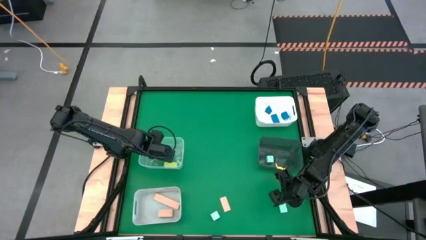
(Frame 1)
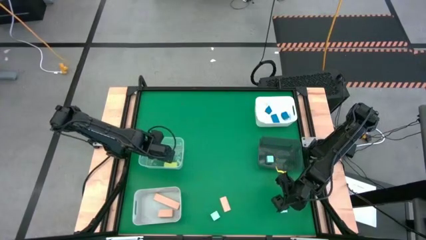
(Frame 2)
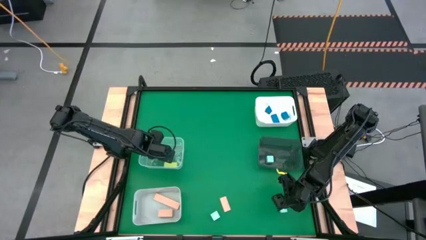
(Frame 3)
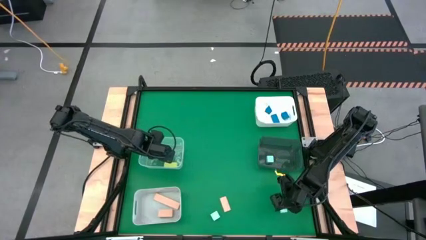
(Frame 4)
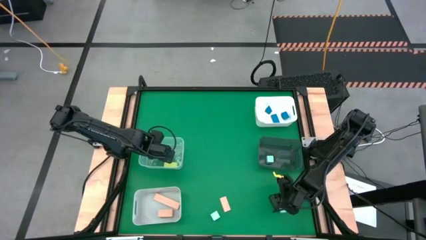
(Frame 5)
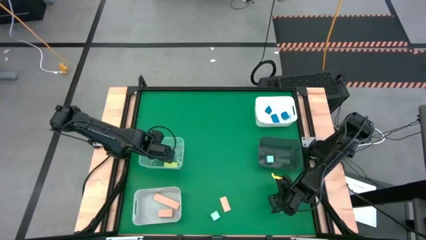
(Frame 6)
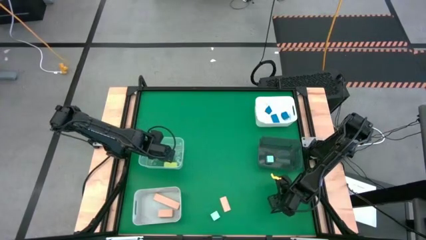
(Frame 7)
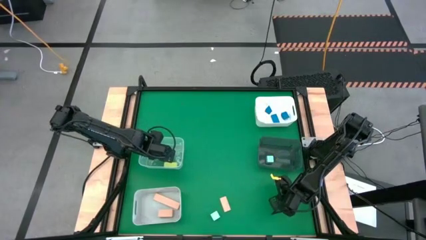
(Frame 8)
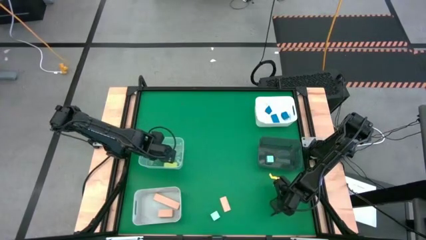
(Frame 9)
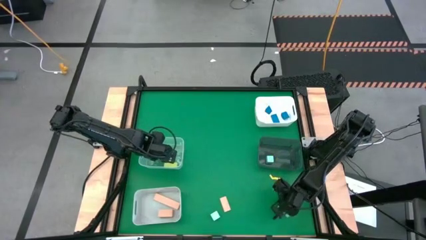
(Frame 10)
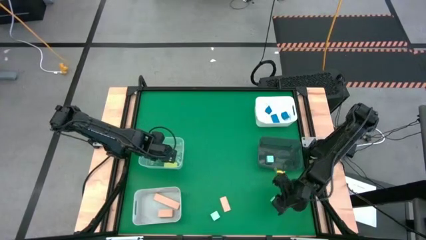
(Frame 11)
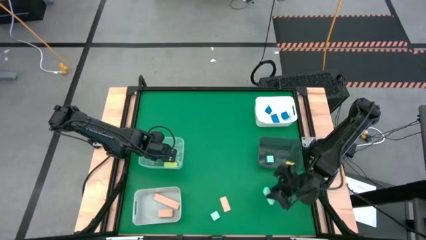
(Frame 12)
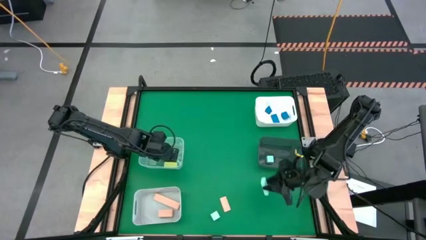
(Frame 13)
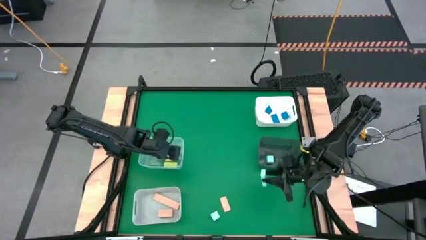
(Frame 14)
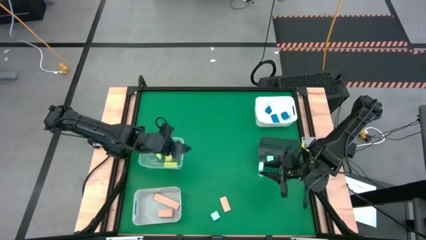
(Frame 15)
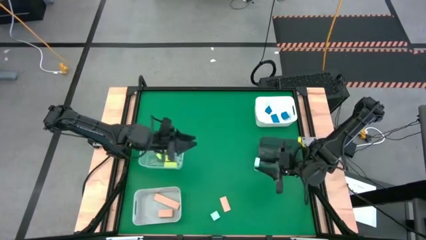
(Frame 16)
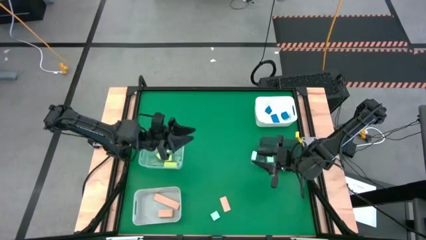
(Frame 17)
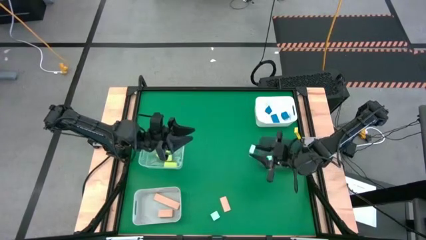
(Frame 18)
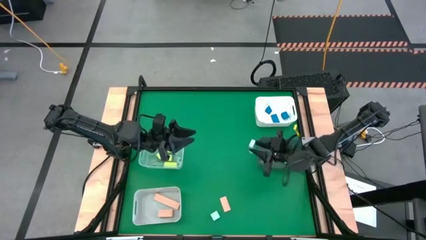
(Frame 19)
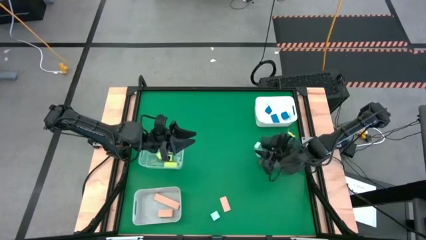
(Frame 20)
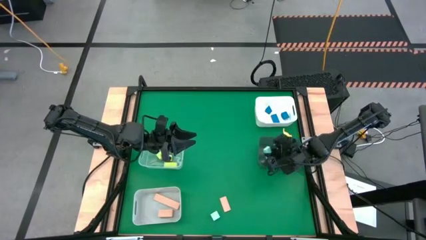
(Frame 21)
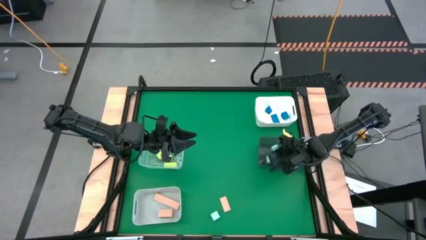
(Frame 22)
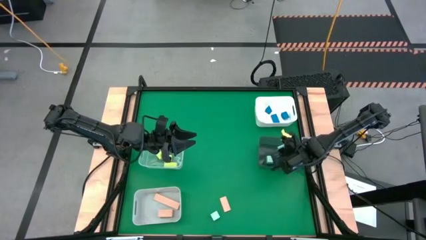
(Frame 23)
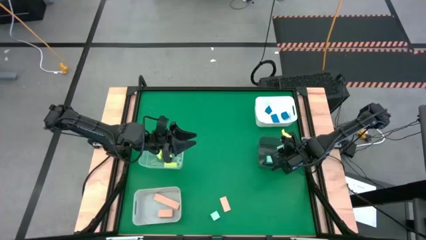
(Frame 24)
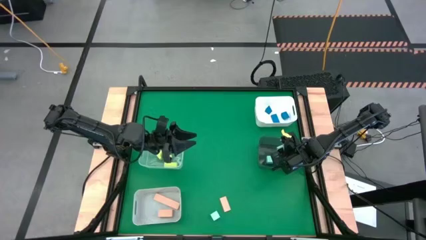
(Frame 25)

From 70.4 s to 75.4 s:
Task: Sort & place blocks by color
Put the light blue block into the black bin

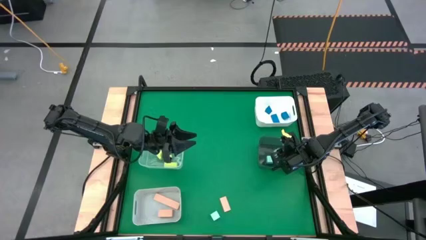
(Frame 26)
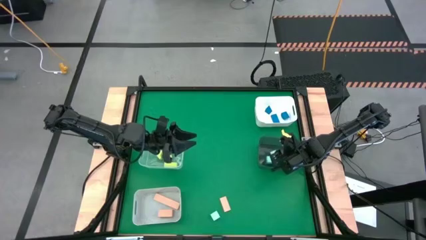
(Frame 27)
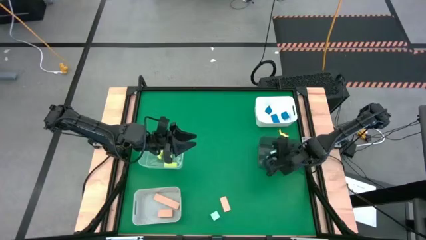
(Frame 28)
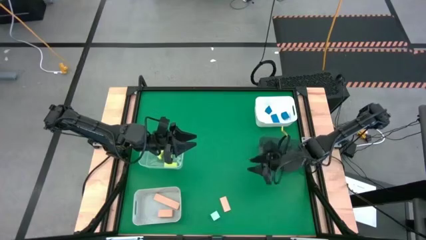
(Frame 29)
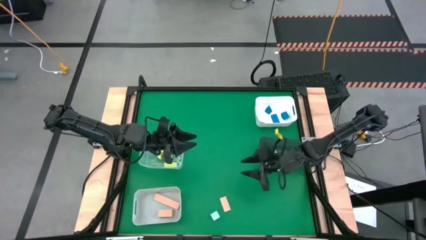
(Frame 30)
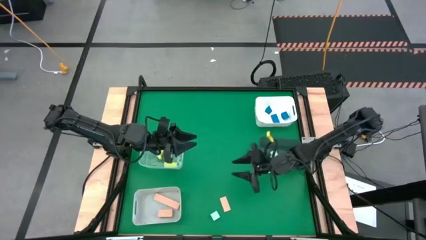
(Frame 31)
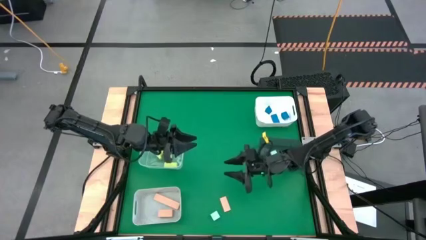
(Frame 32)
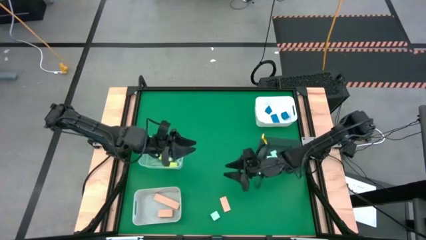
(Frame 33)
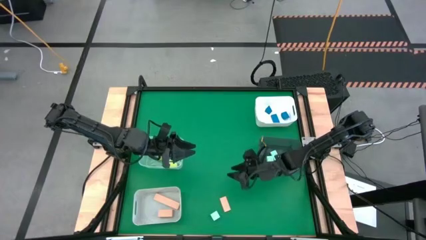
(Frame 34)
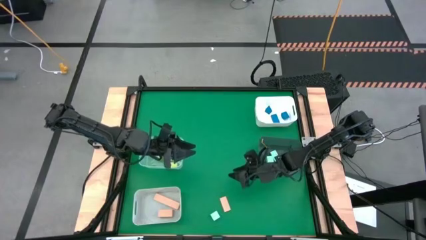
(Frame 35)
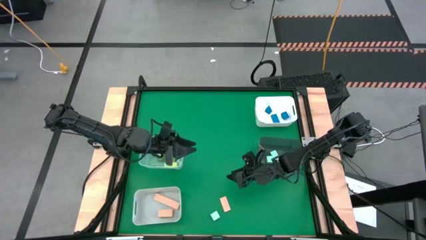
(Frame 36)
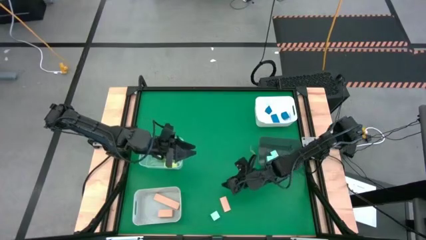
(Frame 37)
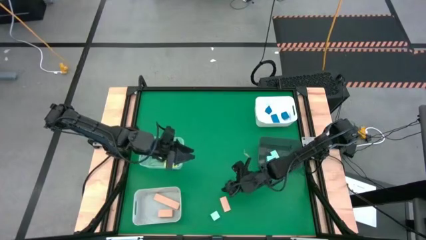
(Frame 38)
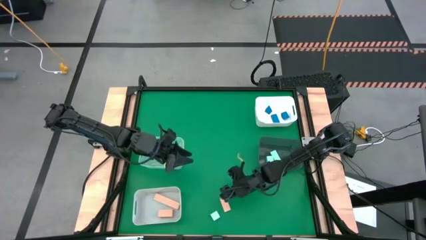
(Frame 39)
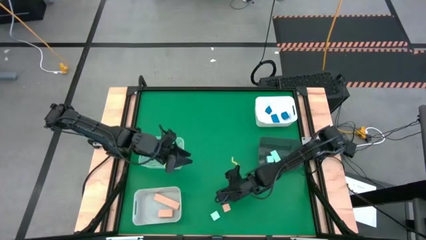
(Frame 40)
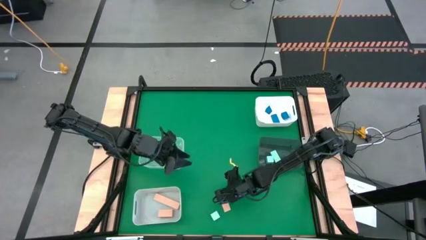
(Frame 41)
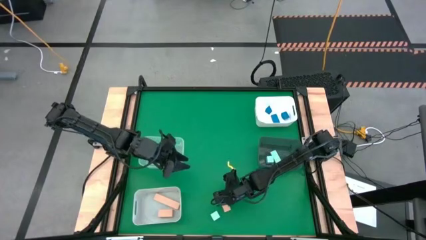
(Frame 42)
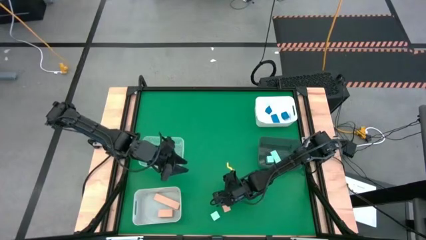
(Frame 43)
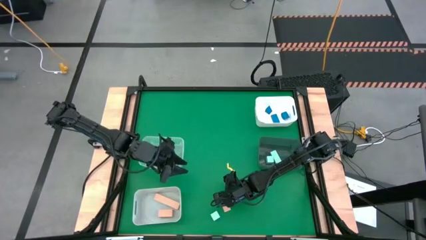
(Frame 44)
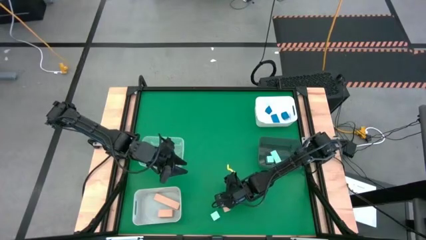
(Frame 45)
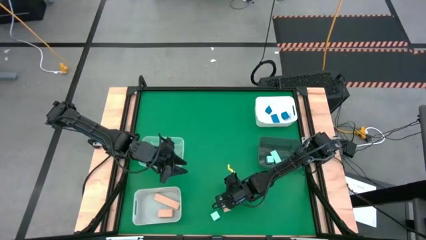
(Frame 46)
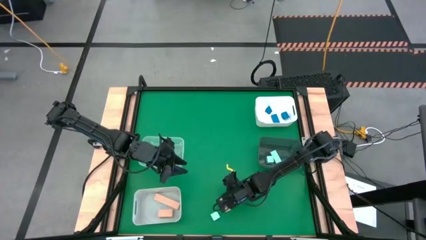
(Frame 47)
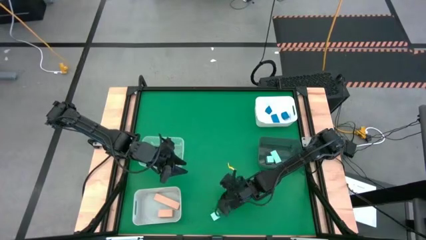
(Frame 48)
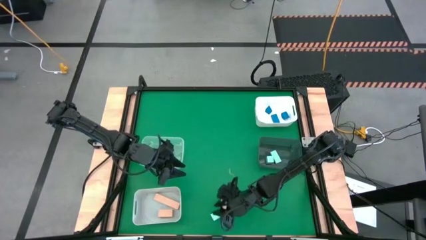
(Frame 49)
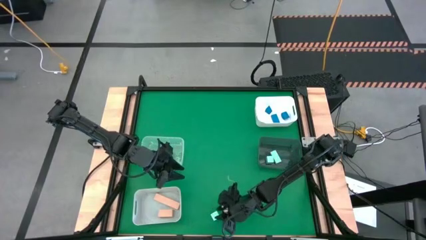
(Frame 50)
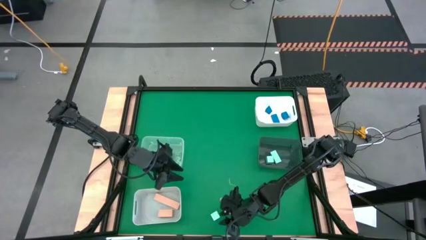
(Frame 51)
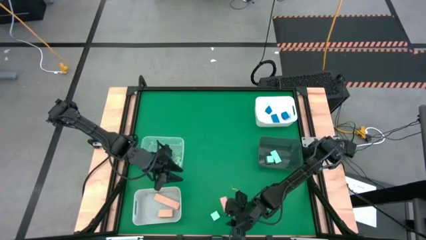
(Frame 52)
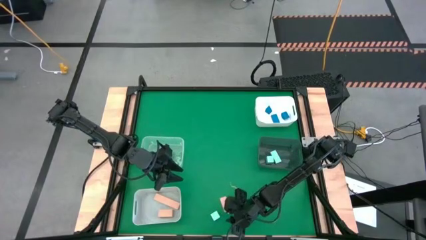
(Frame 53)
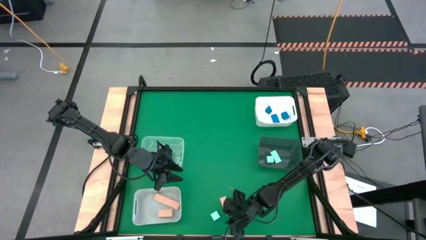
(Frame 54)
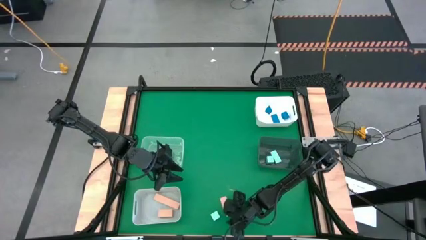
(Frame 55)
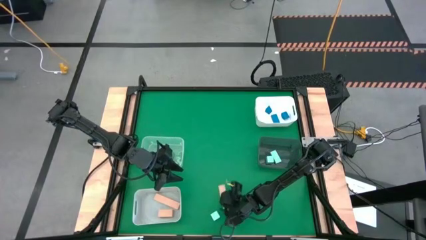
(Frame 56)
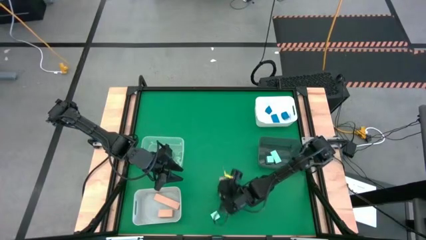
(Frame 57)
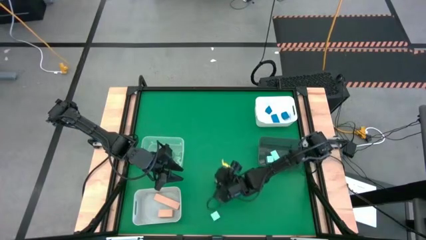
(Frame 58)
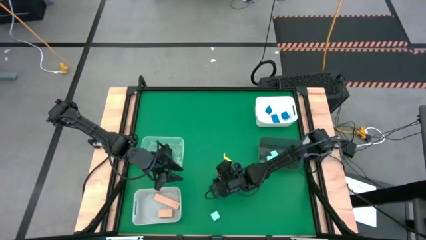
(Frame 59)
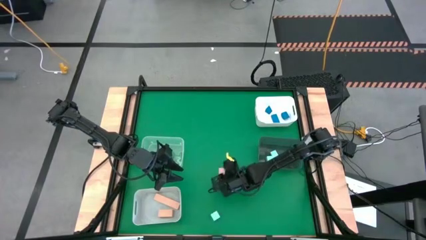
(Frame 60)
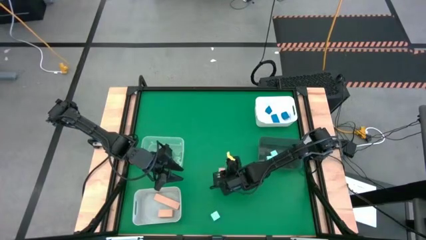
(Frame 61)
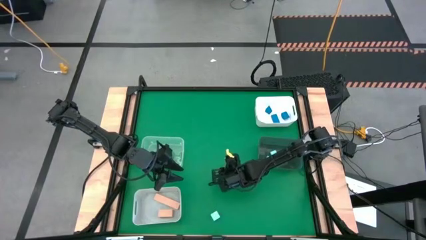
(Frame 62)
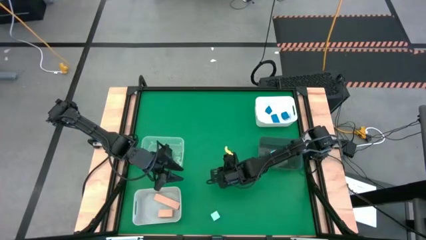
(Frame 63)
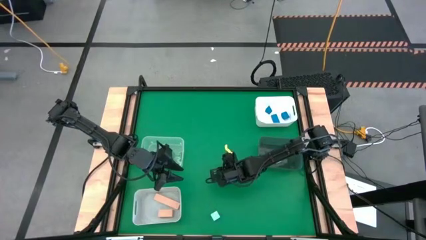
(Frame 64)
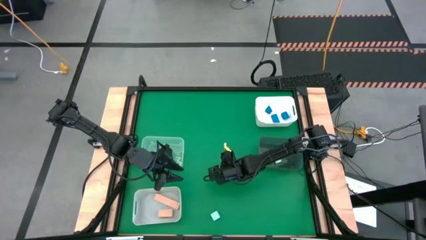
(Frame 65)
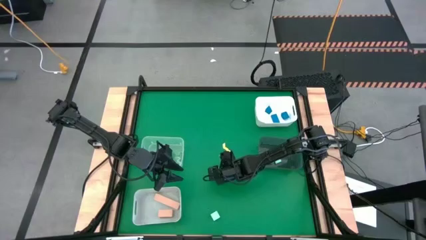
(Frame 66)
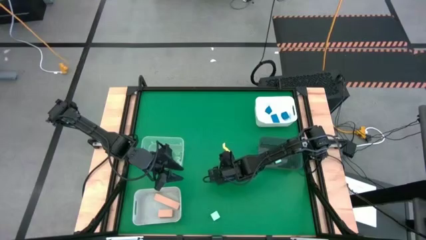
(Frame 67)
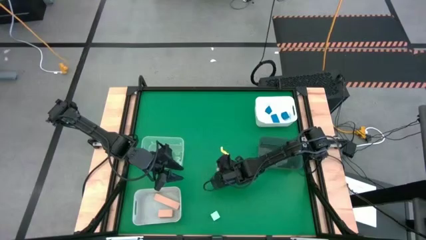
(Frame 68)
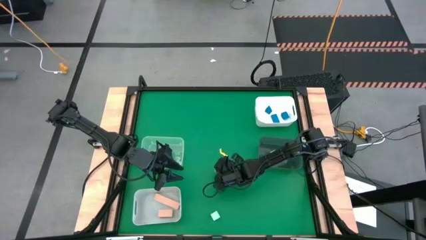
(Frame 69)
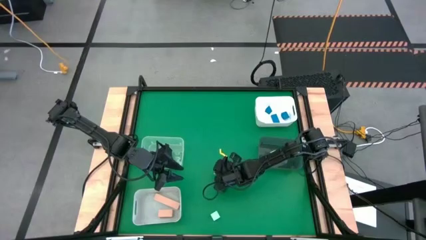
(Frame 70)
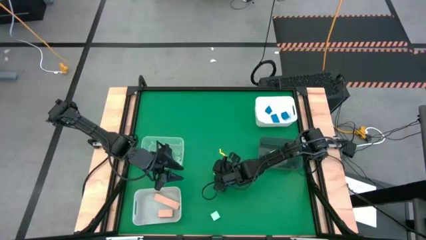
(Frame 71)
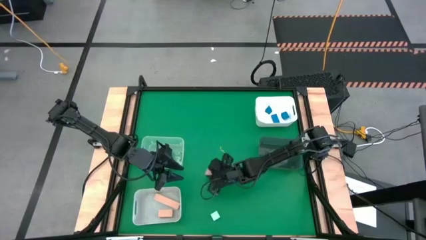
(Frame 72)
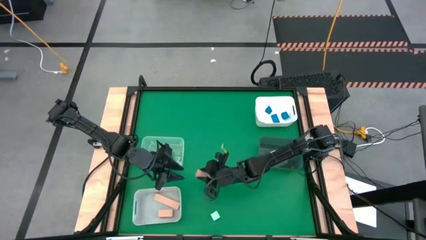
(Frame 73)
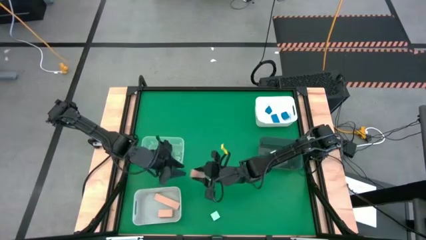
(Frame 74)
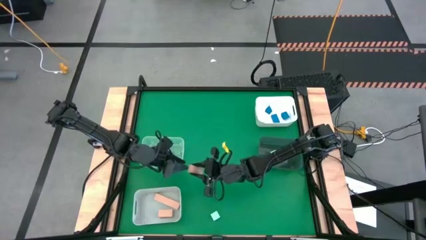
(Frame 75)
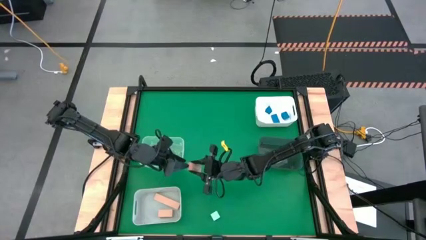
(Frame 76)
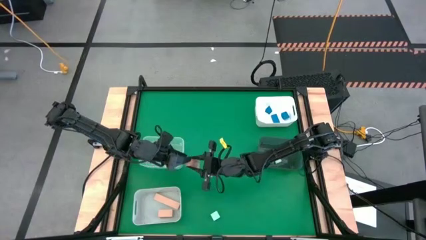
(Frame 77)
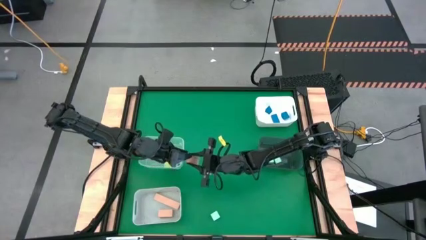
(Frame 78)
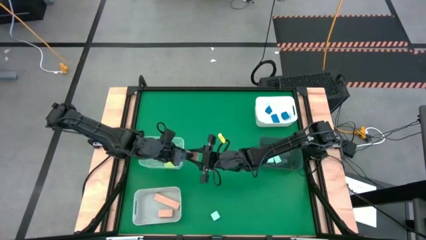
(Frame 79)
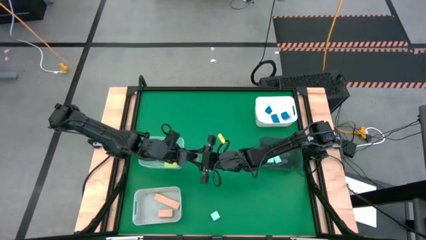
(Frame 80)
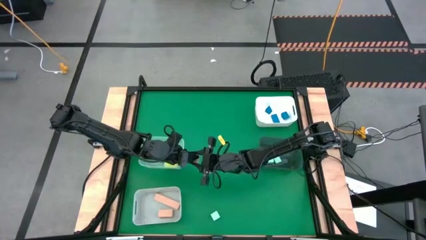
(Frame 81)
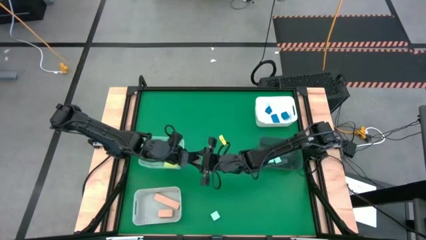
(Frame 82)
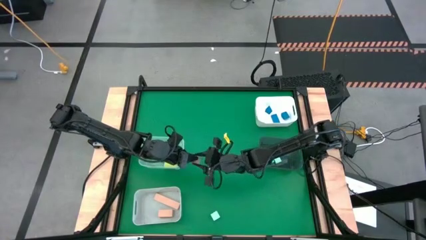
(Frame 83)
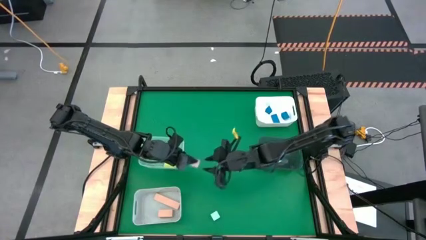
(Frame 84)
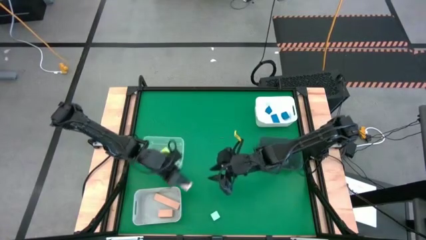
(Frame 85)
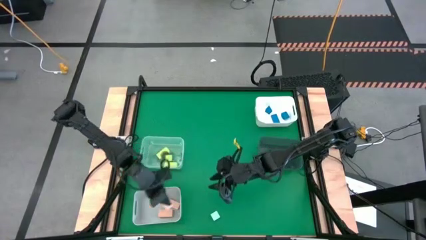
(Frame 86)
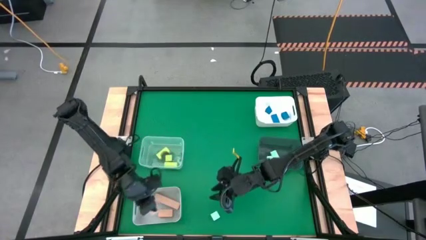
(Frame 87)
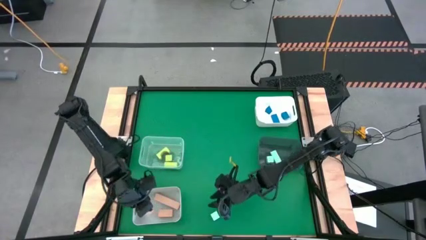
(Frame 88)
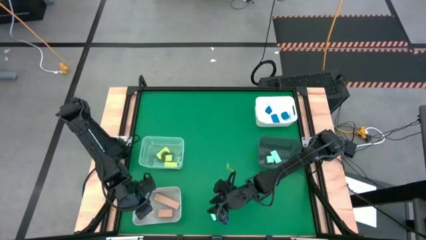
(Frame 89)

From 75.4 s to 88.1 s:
Put the brown block into the gray bin
